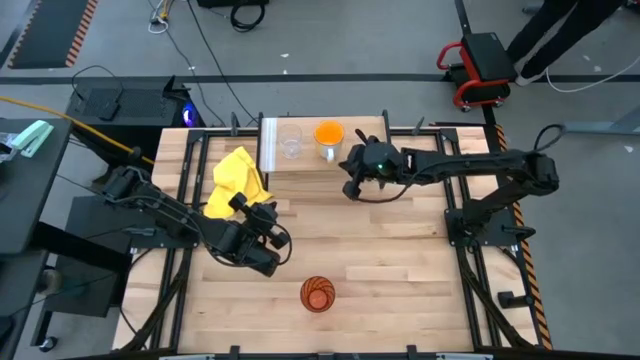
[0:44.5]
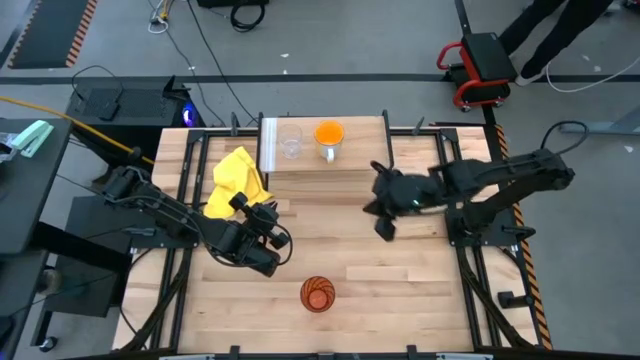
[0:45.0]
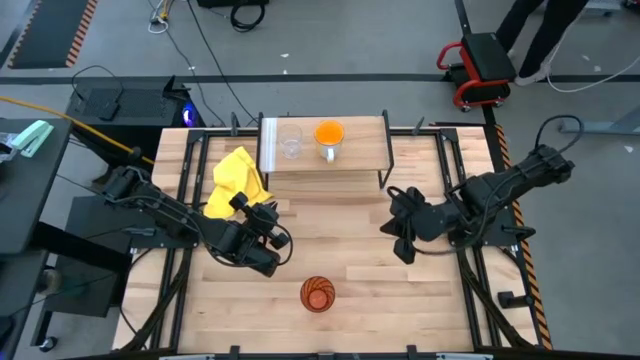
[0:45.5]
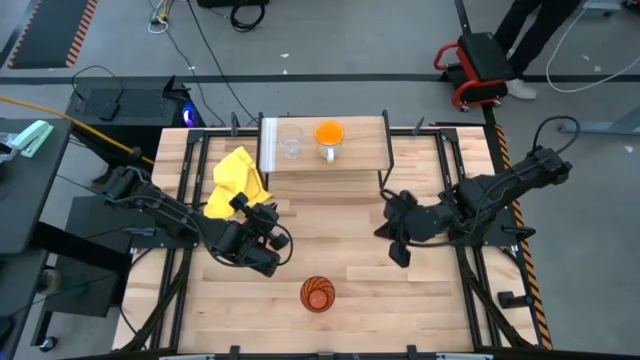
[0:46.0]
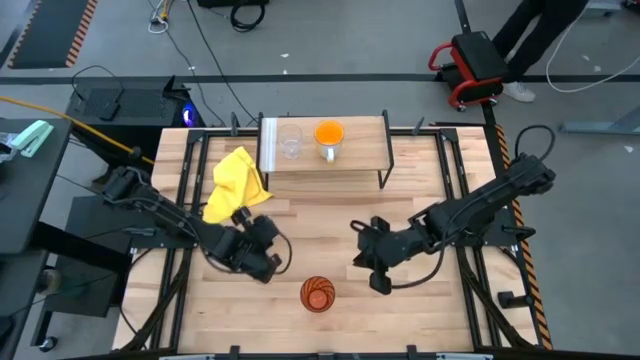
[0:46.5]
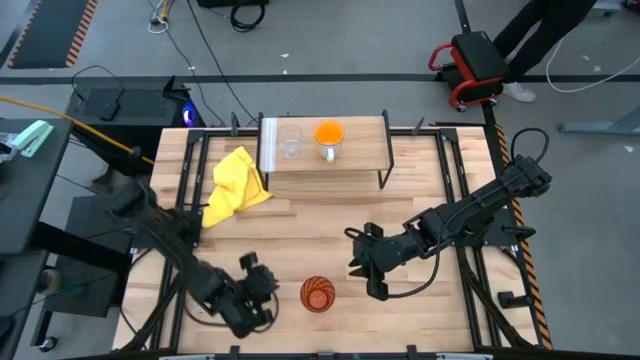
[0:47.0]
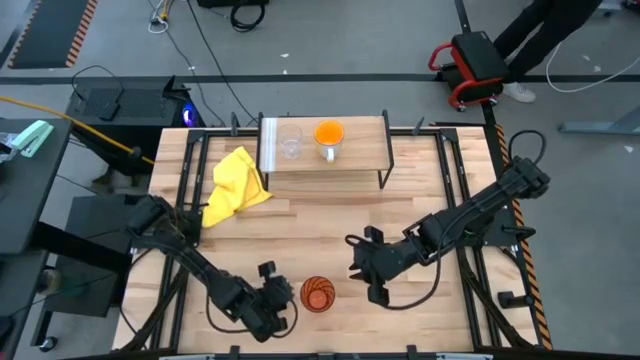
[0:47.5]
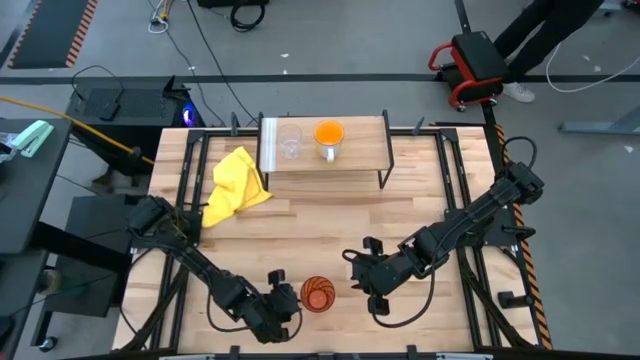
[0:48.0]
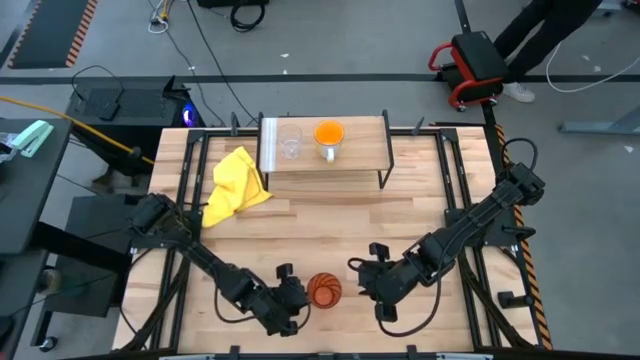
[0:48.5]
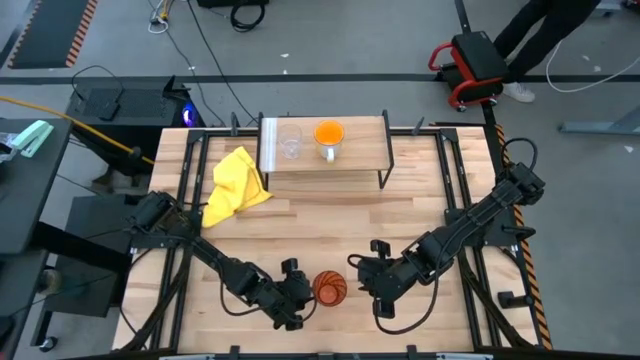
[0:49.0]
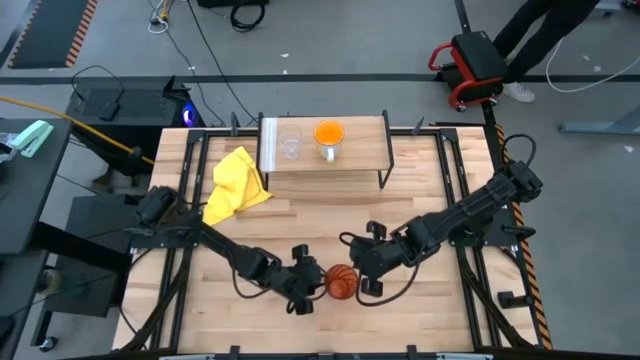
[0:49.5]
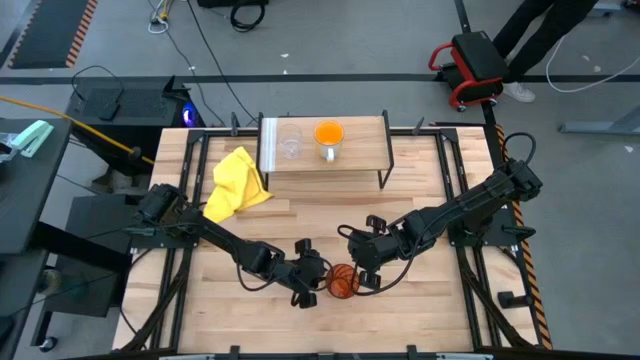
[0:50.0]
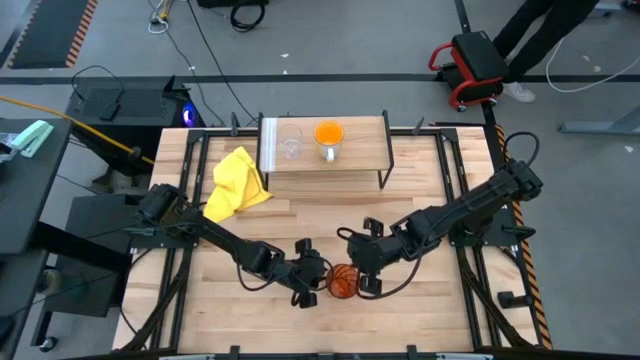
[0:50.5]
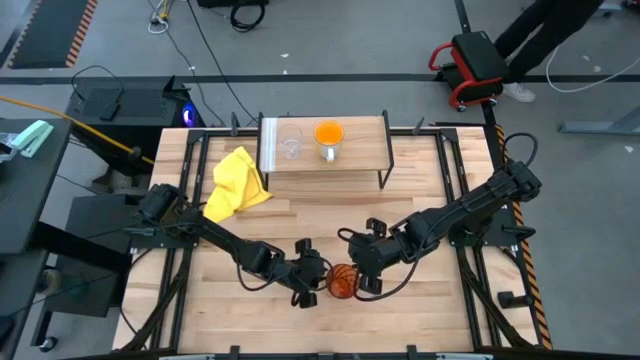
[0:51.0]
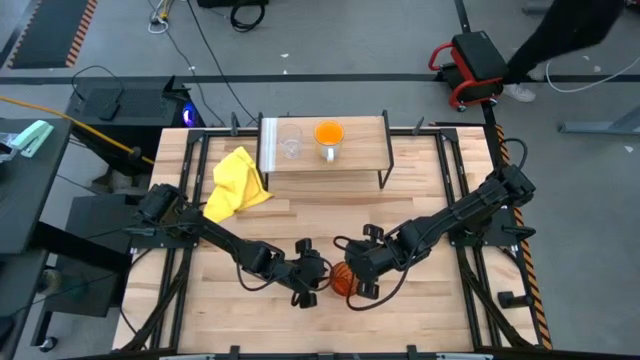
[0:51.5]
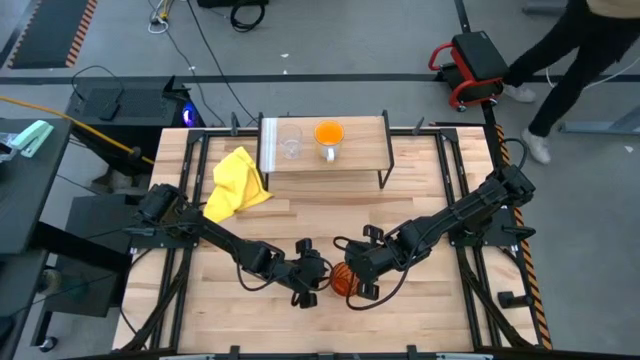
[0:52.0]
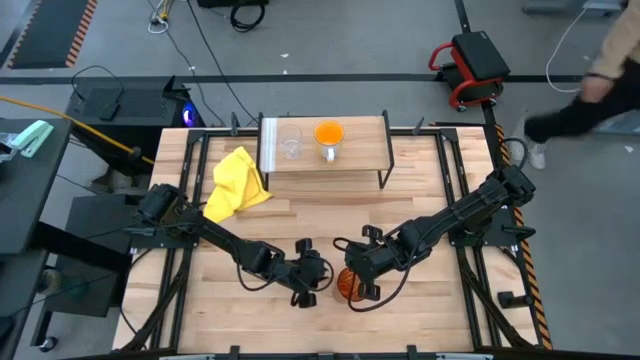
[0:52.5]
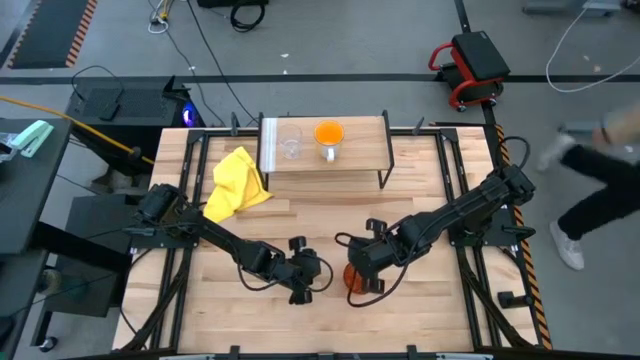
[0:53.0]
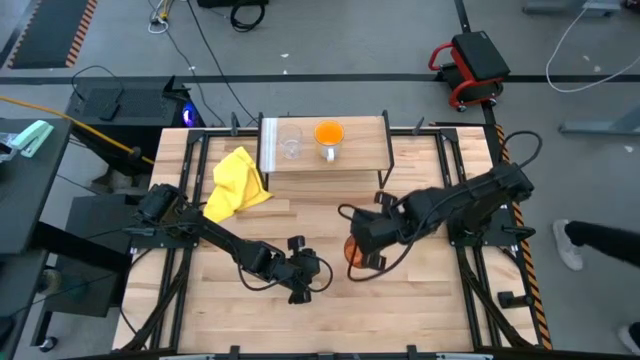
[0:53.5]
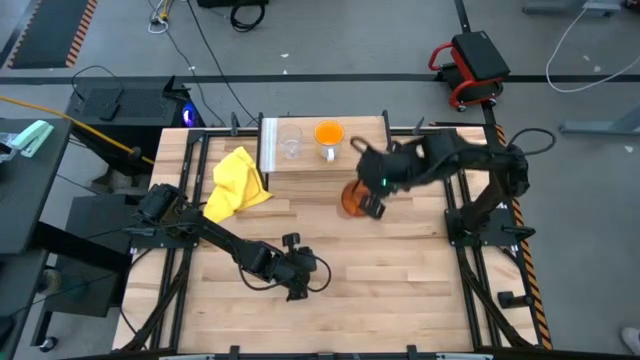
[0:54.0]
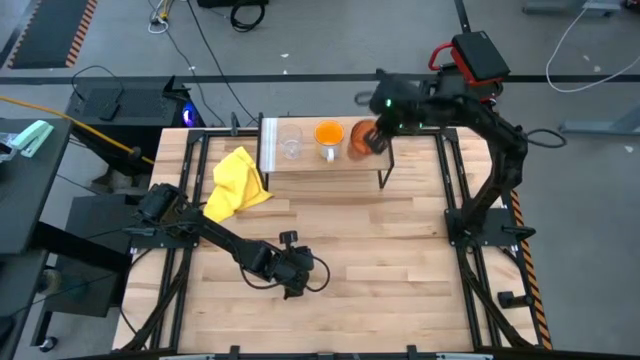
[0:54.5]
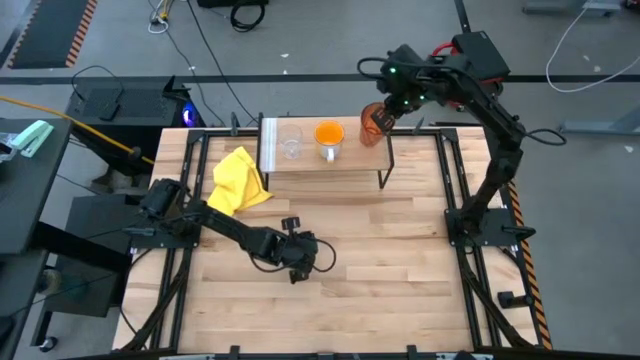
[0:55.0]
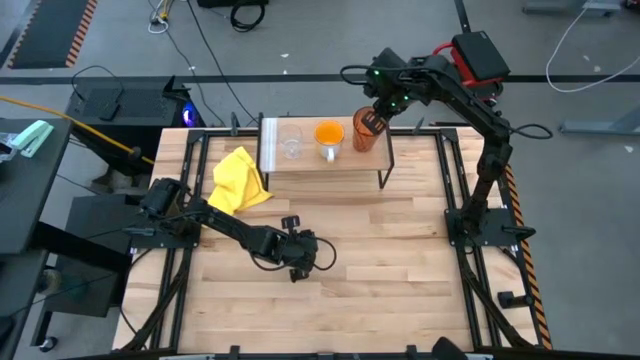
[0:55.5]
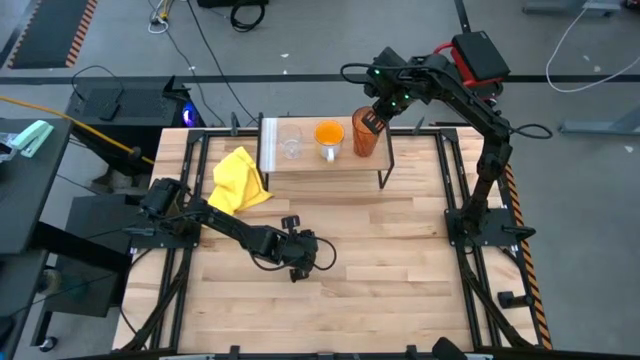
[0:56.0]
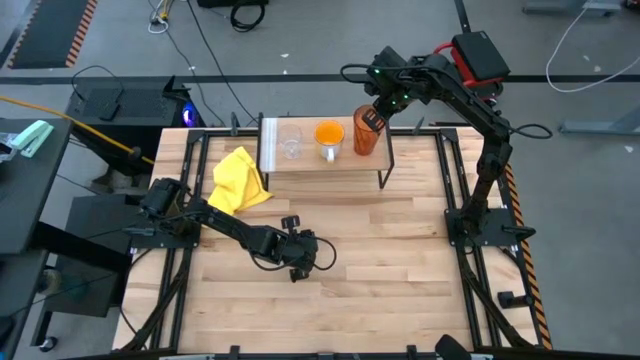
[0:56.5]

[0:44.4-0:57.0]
Task: Stack small to large cups/mugs on shelf
Put the brown cup on the shelf

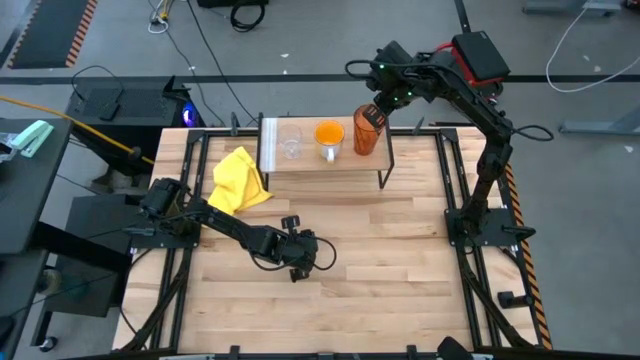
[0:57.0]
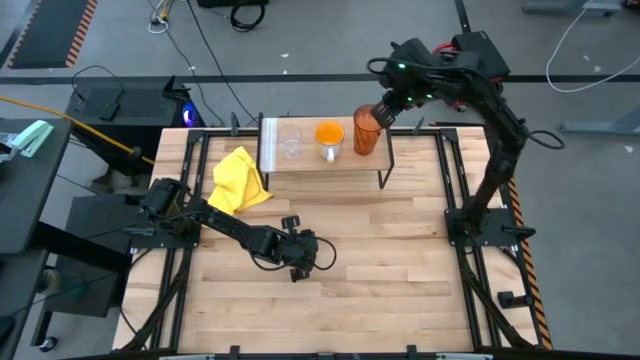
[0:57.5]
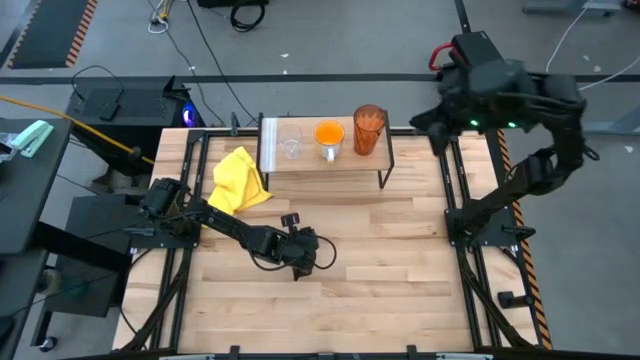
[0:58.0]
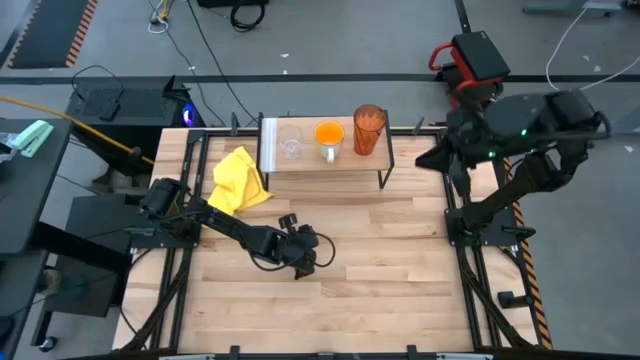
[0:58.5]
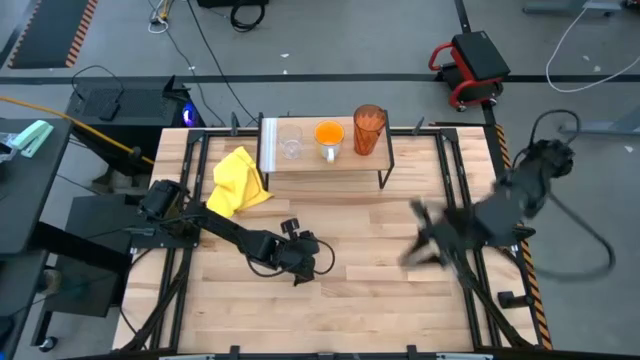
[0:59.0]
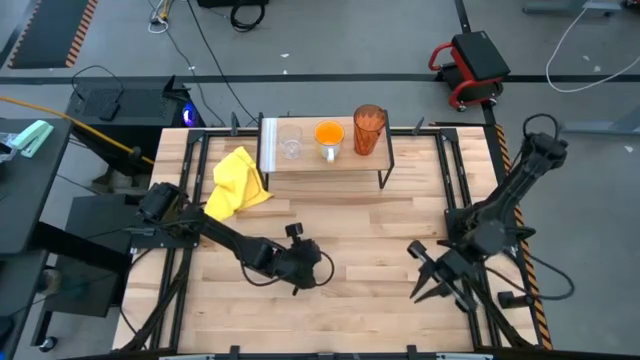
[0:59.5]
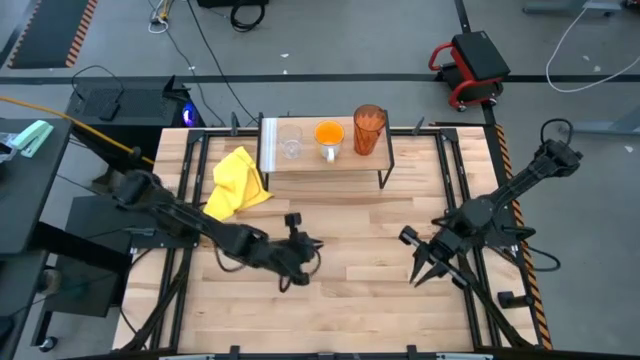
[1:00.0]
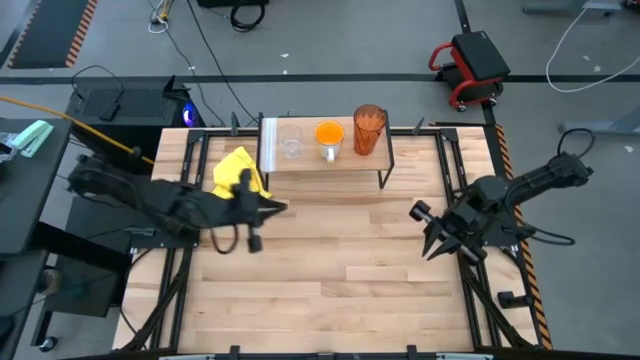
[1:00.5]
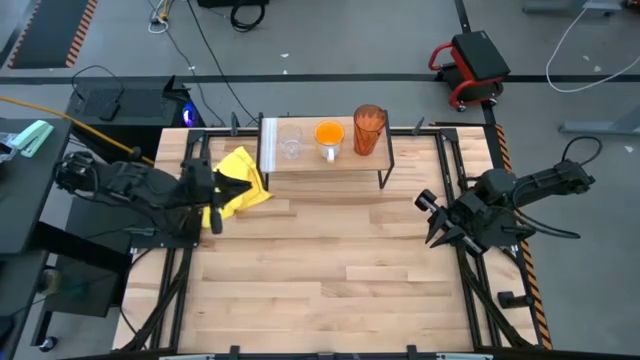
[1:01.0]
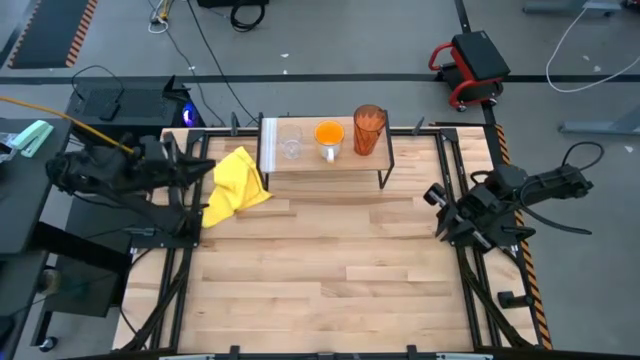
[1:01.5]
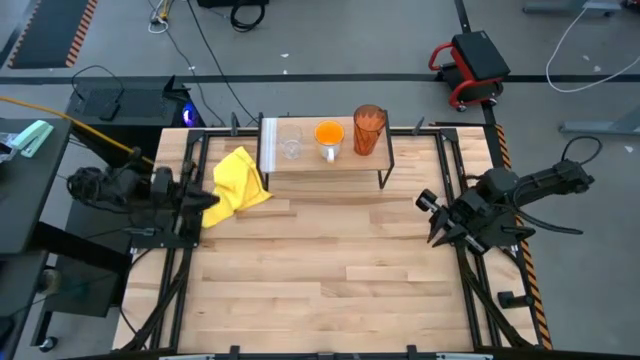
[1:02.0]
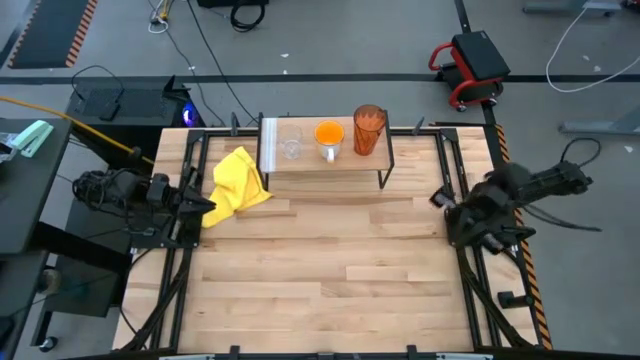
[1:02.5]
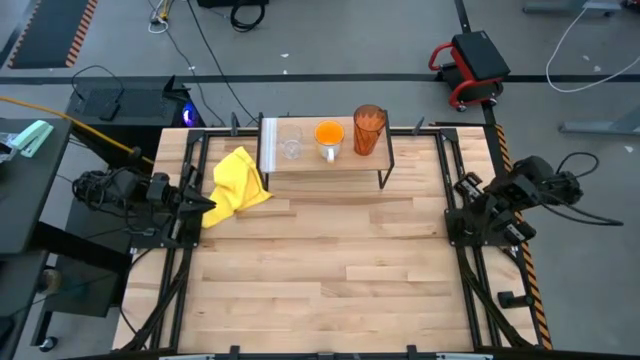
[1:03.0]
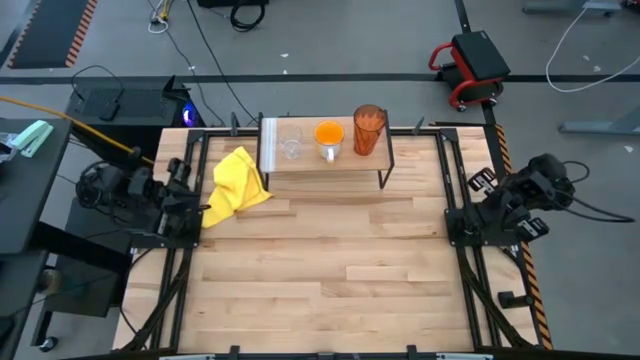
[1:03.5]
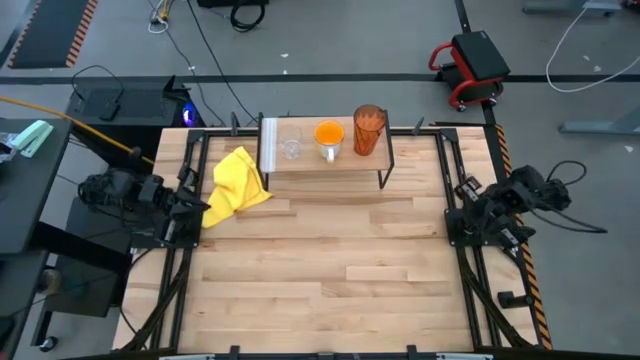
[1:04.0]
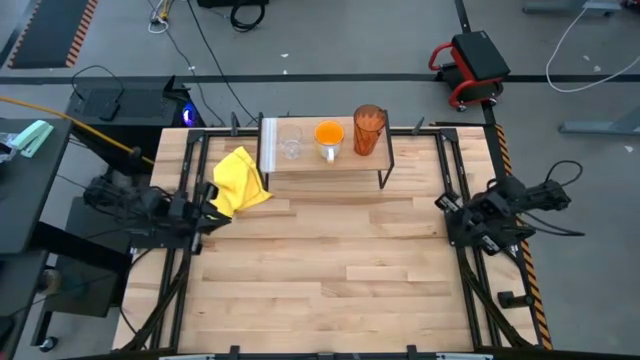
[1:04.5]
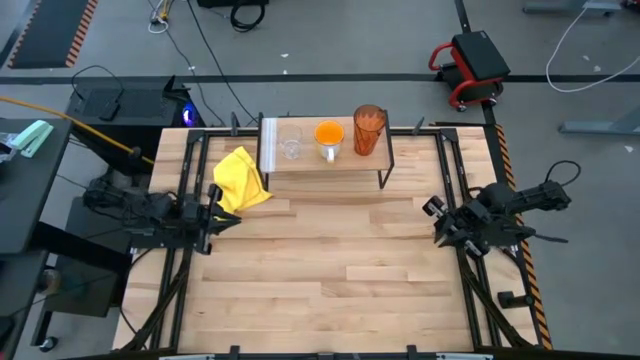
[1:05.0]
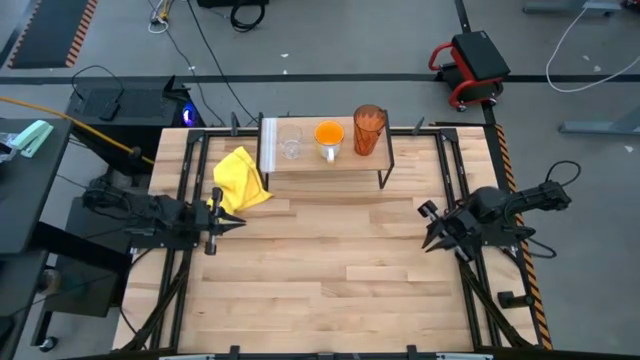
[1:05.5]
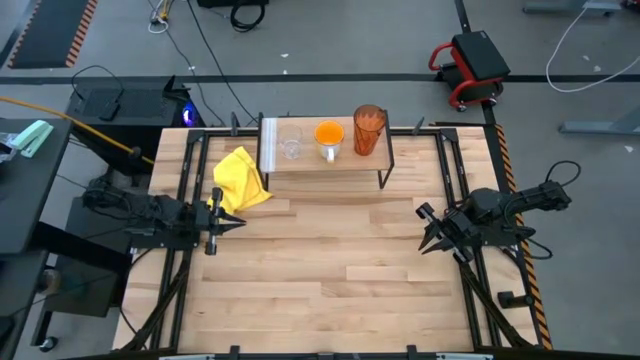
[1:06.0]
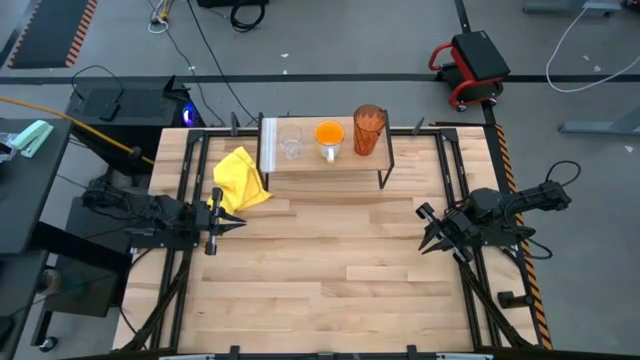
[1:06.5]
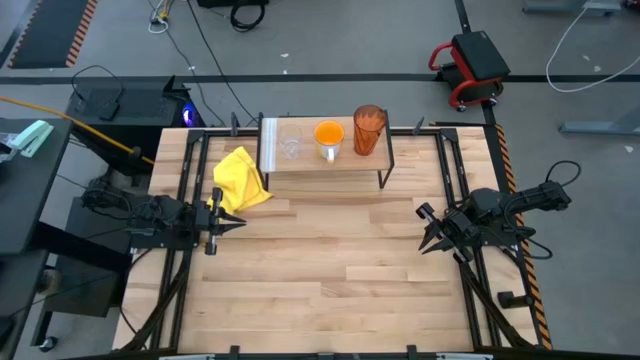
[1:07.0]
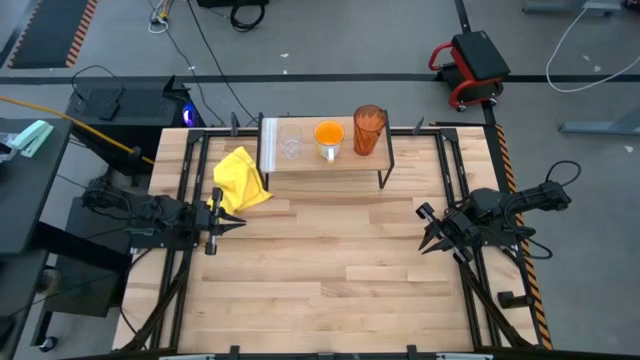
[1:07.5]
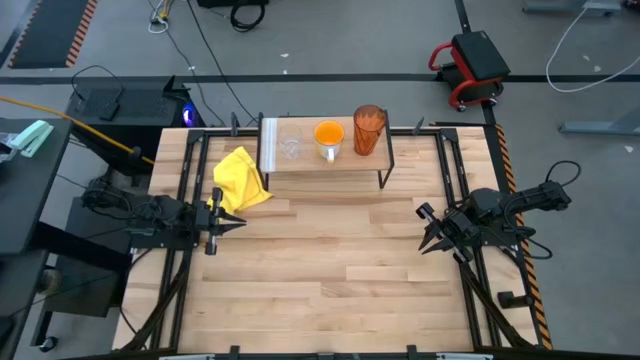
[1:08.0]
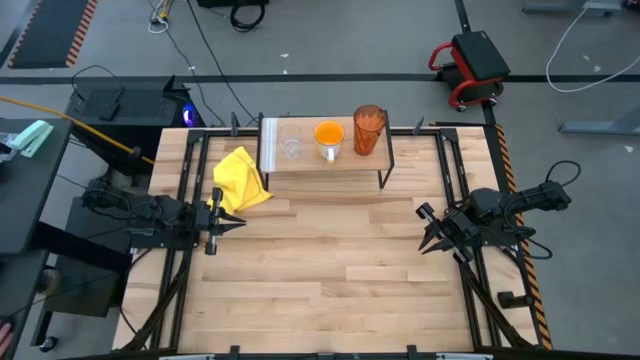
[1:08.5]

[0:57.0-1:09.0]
Return to Home Position
